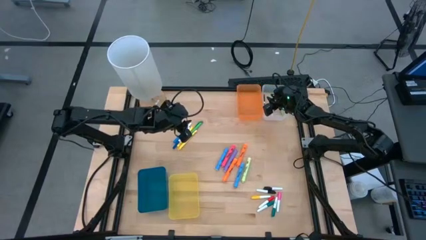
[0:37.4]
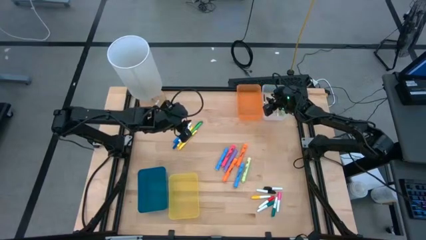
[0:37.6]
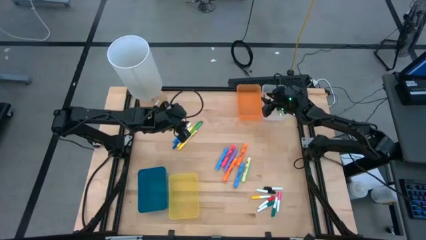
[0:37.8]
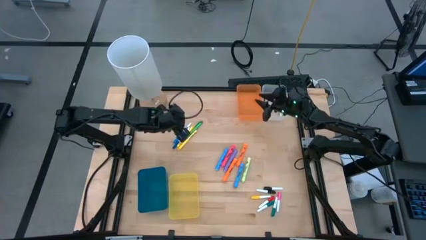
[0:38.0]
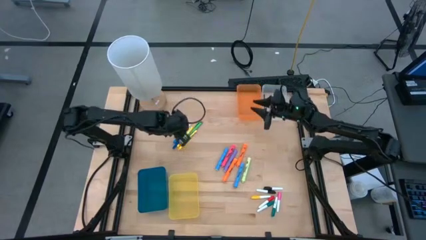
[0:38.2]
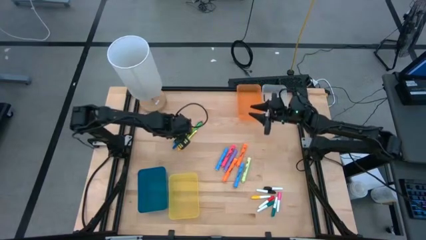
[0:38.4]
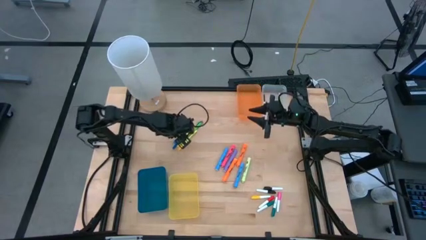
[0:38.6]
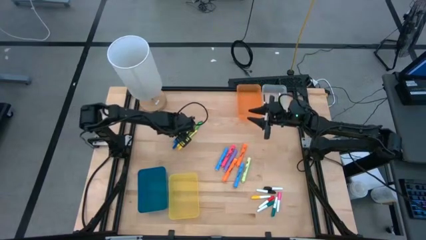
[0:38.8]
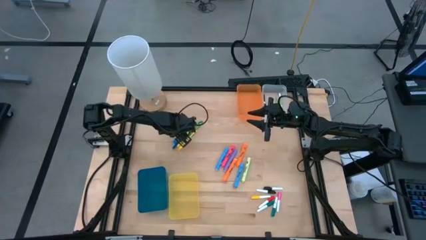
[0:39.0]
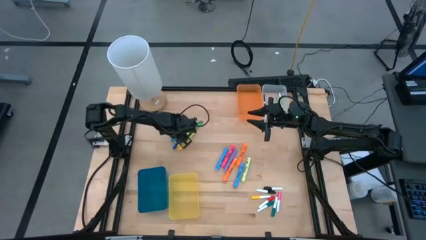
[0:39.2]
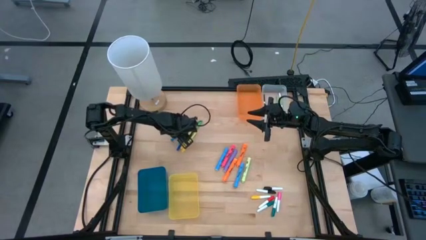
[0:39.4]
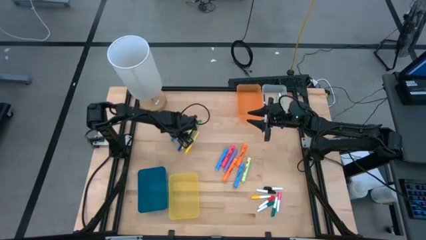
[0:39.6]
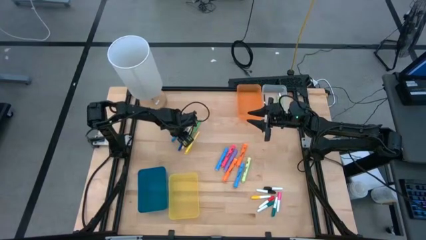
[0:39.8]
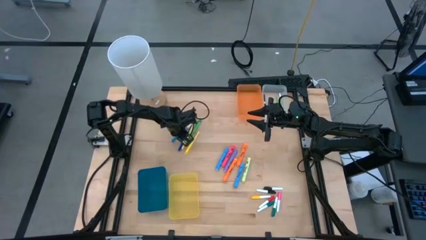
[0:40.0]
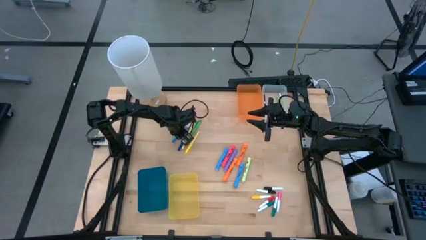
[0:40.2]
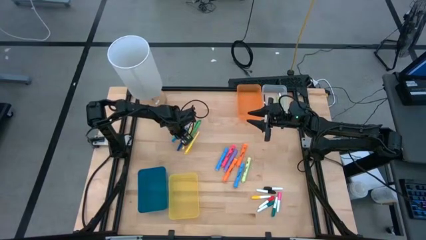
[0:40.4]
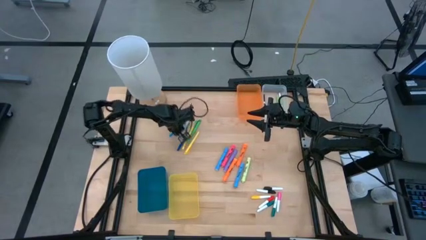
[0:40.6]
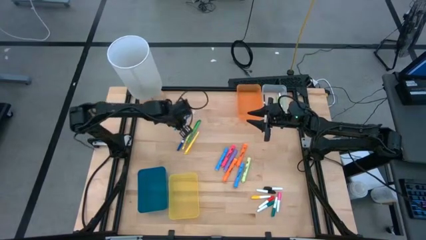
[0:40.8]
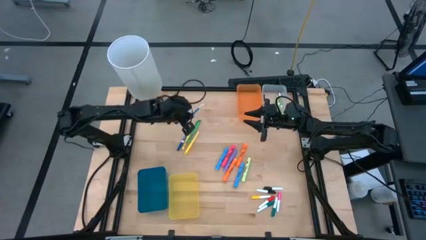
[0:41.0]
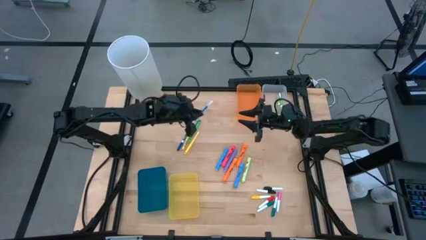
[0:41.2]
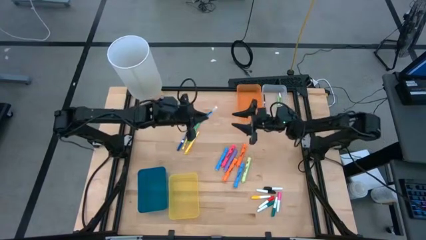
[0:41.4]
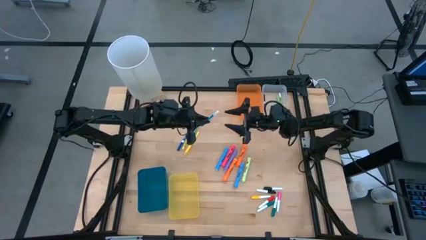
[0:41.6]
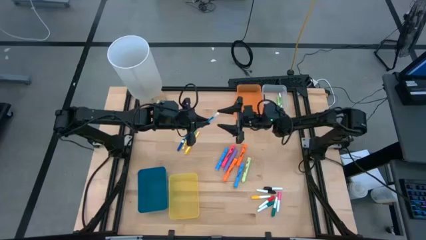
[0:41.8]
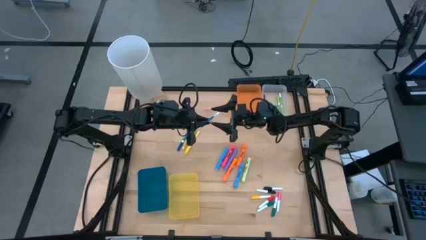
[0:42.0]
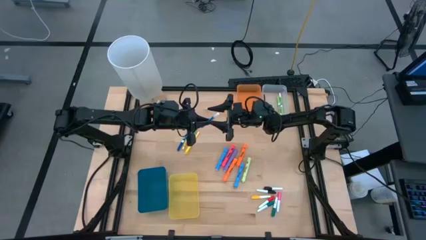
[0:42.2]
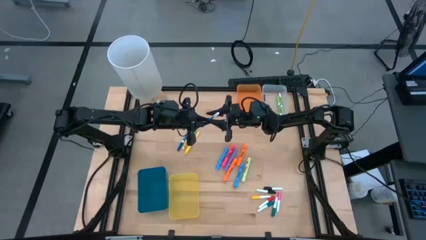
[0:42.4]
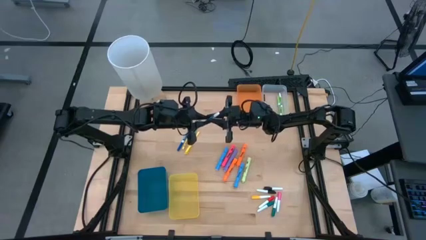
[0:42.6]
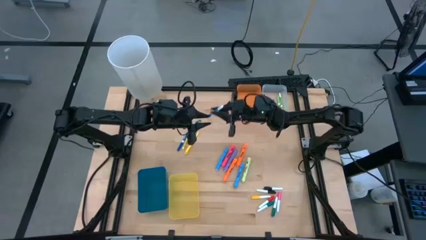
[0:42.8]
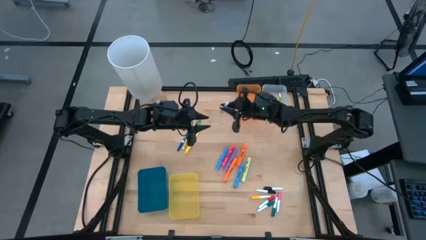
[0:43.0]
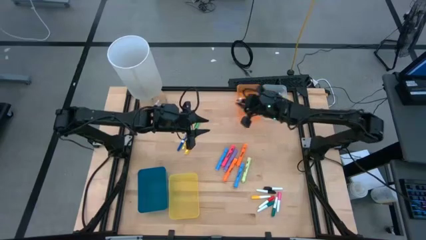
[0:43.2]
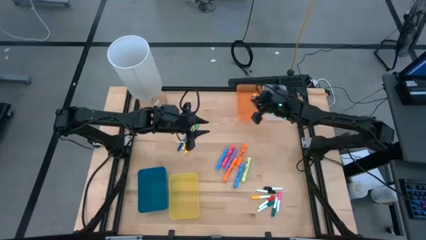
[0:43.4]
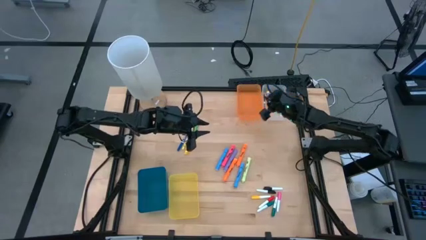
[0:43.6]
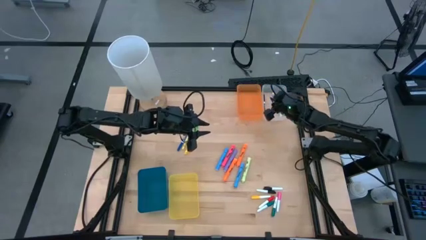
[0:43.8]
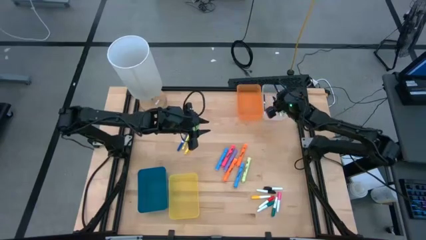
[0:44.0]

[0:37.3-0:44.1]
Task: Pick & Place Markers
Put the light blue marker pen into the transparent bin

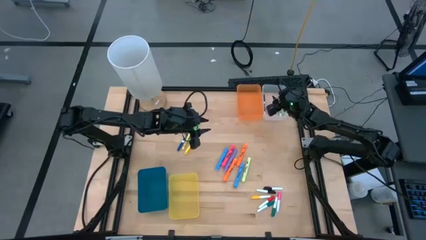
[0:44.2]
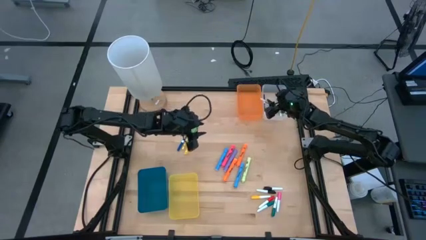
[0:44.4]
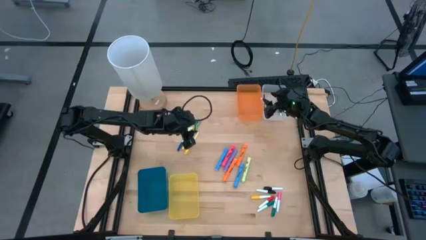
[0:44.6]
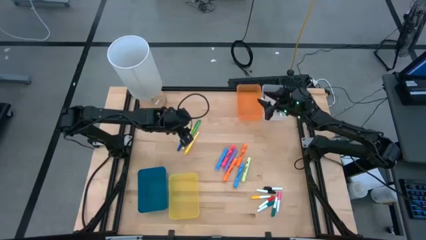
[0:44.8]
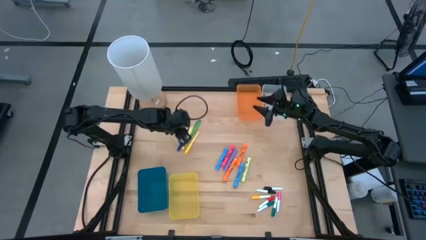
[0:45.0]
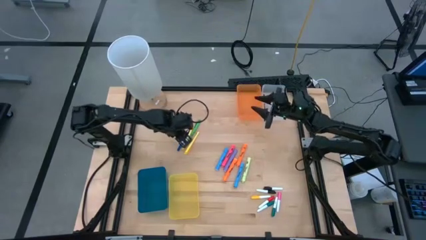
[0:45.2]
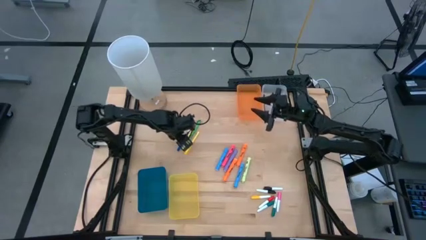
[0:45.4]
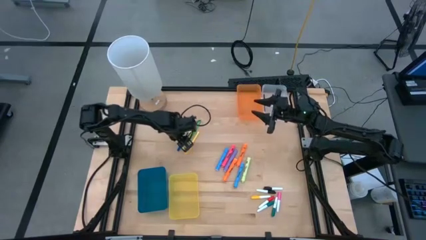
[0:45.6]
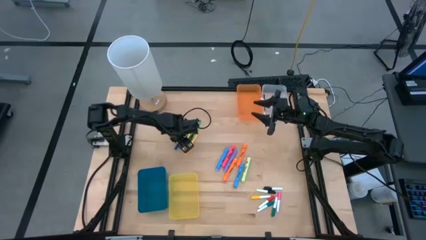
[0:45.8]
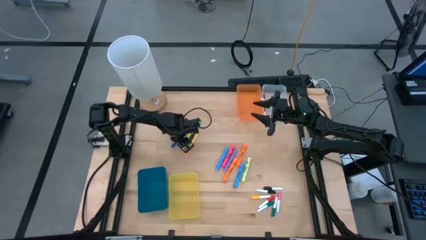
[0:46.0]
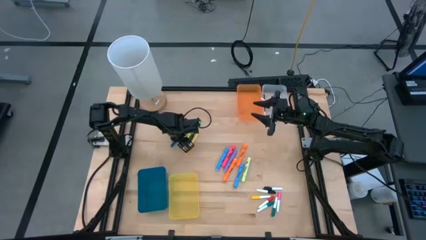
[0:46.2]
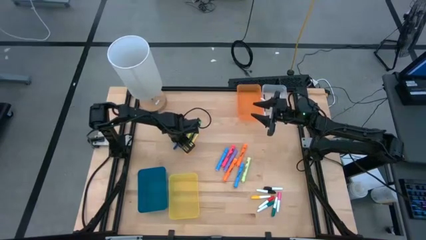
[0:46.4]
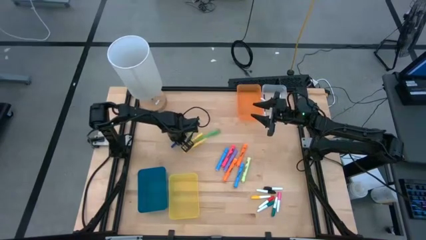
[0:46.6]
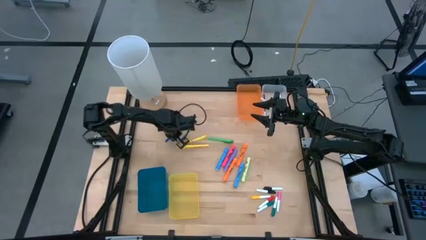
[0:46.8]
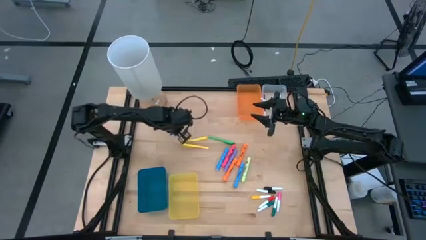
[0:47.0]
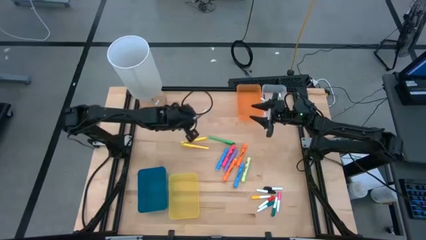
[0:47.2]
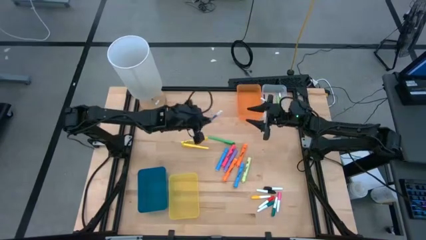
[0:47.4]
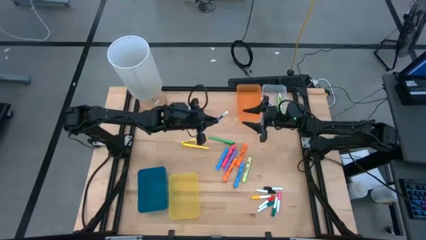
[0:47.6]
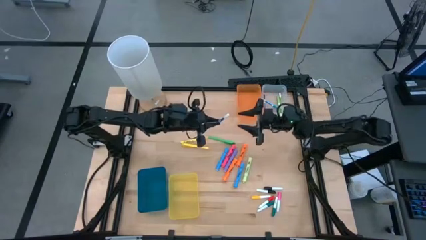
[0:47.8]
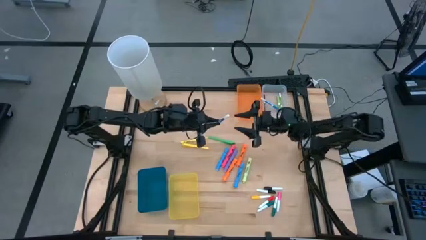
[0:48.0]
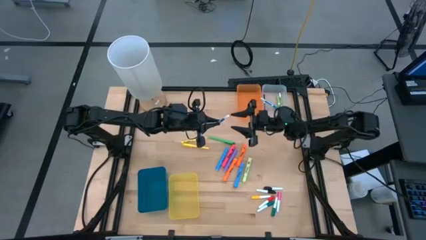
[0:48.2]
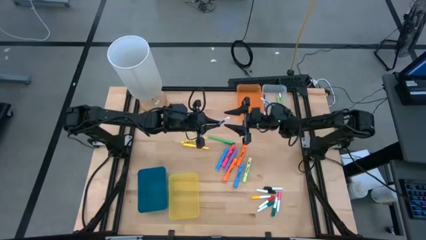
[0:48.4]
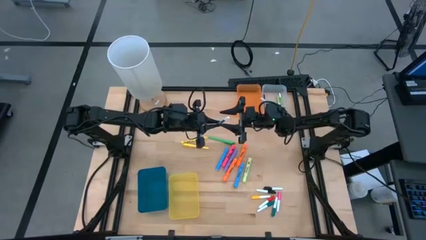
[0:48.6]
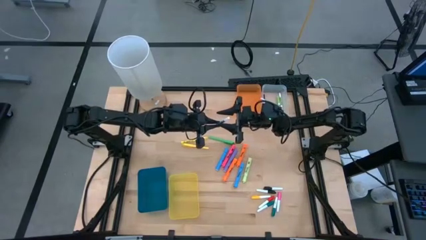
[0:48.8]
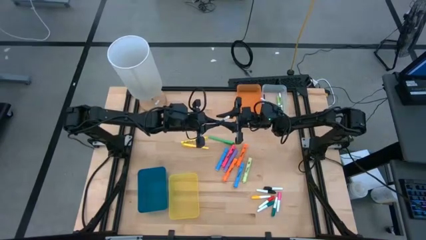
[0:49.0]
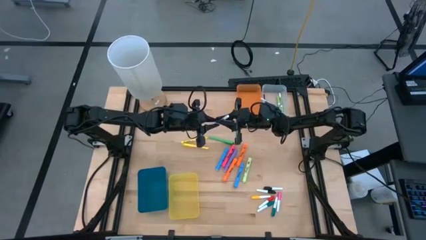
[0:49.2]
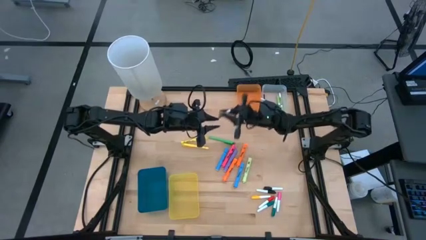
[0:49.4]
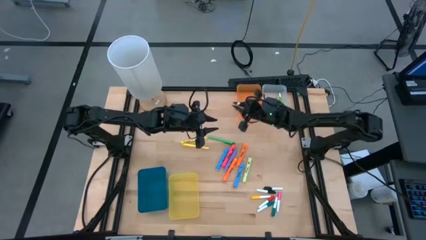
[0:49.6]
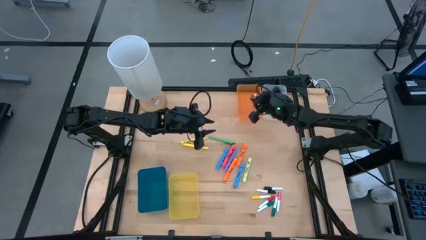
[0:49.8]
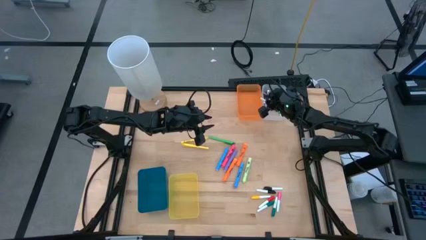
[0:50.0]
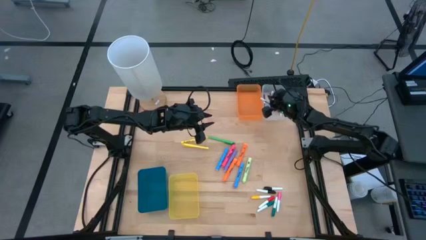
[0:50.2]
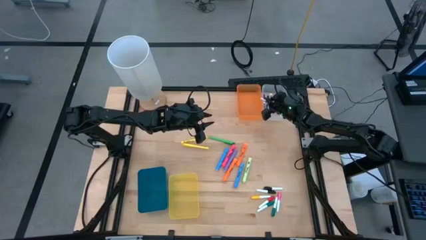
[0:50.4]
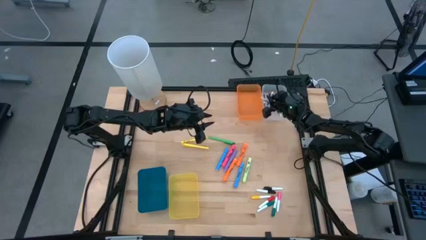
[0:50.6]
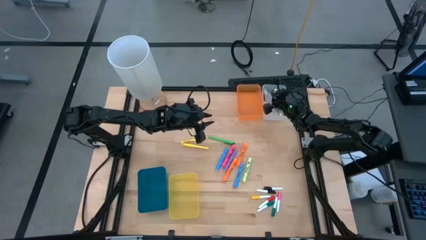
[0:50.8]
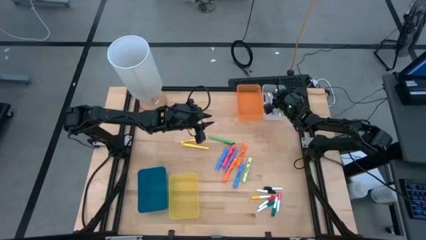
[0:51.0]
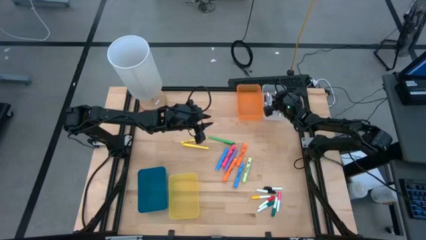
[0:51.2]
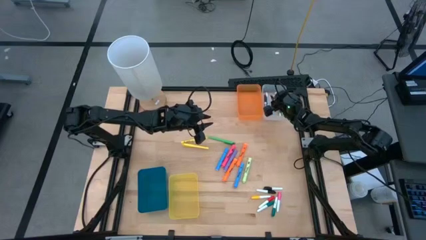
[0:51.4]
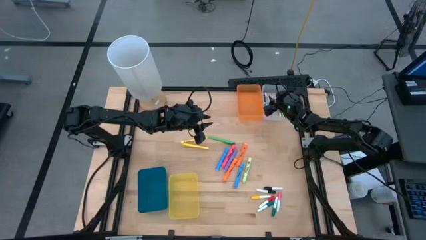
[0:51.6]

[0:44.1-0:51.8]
Put the blue marker pen into the transparent bin
